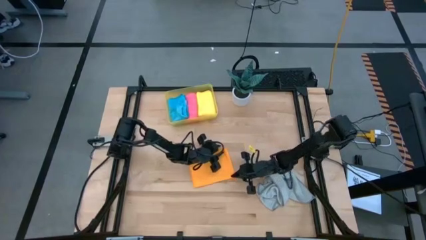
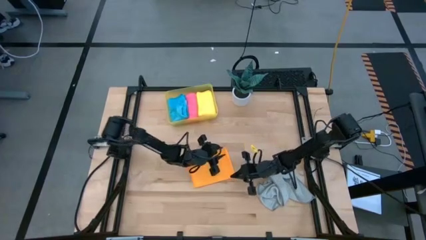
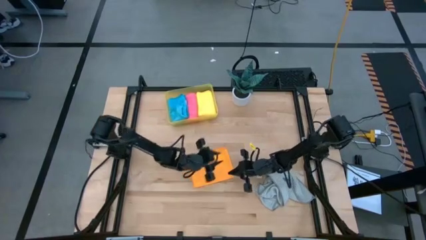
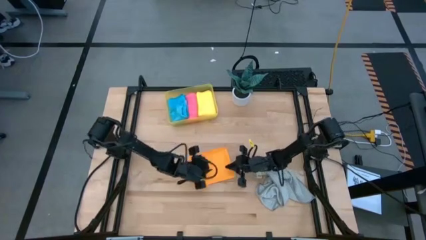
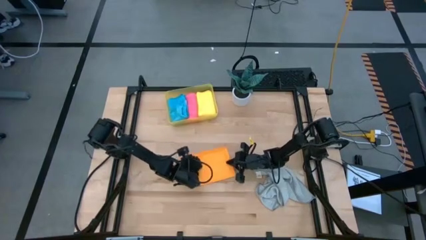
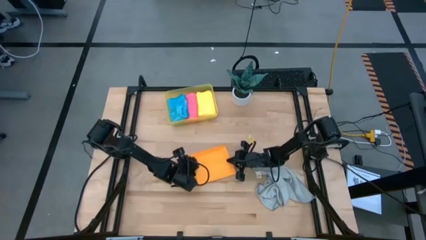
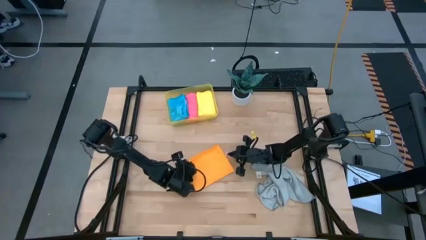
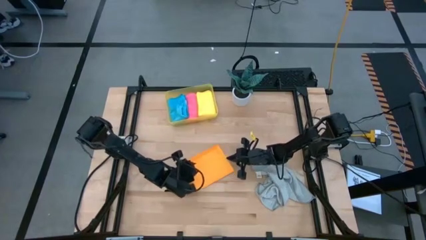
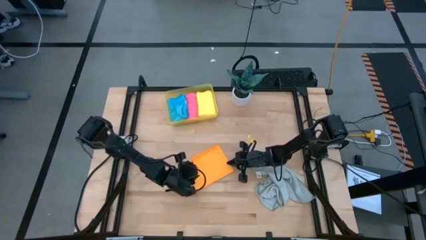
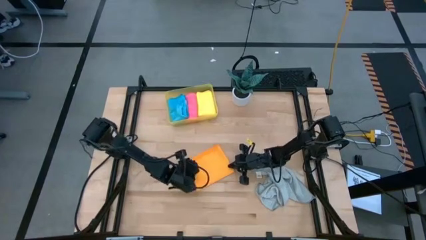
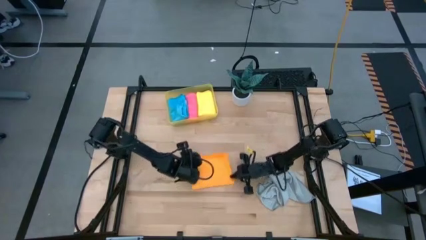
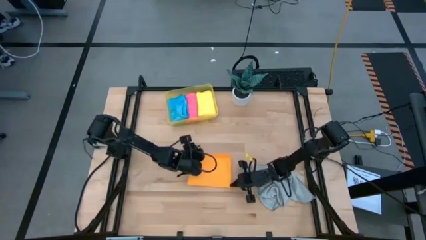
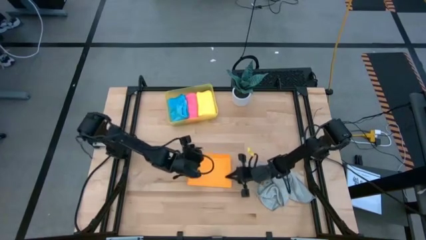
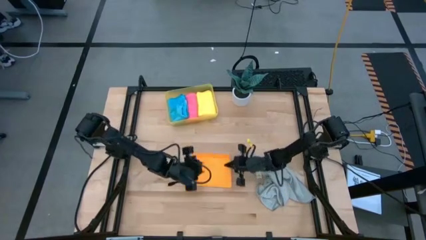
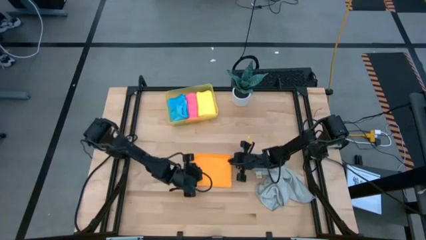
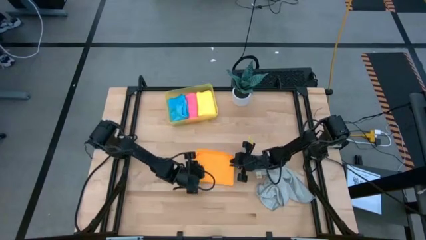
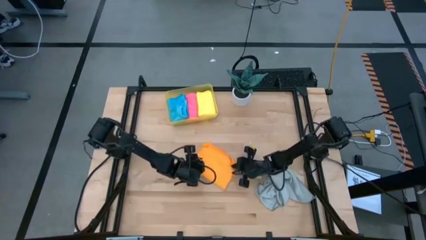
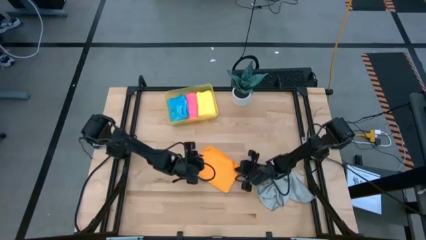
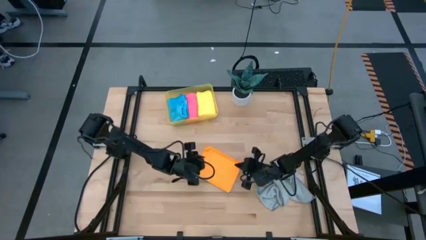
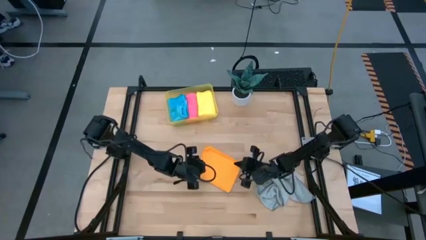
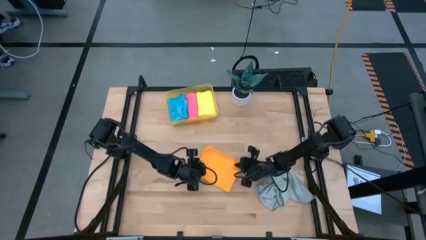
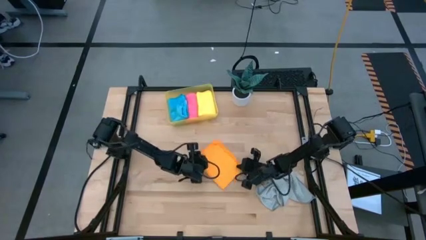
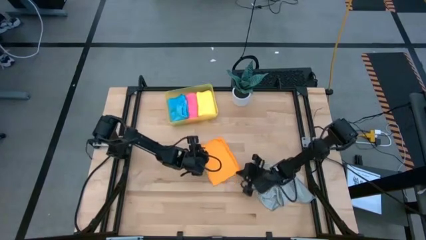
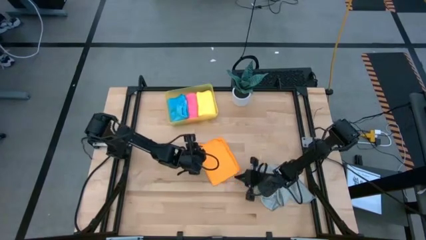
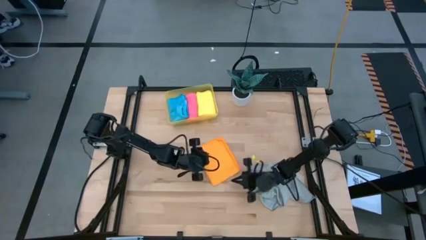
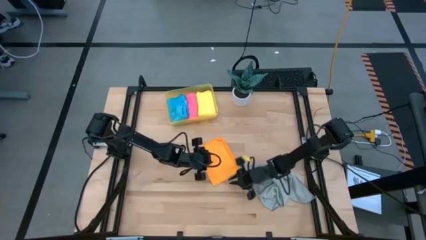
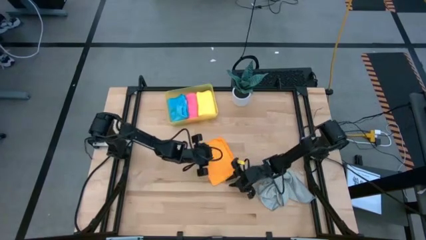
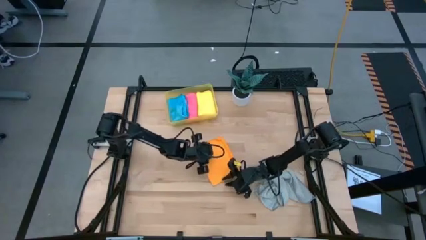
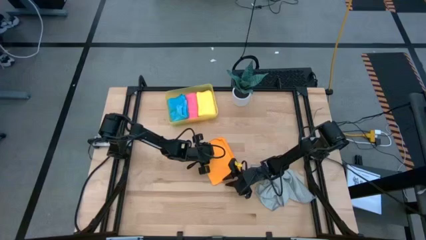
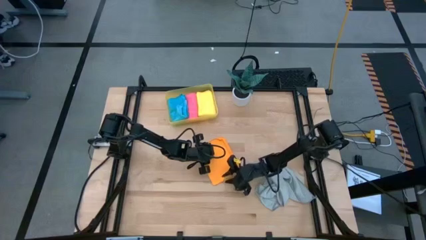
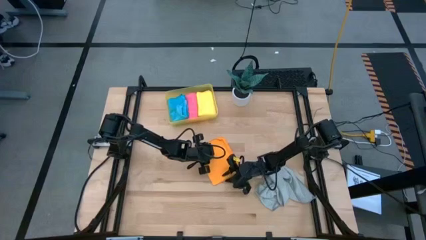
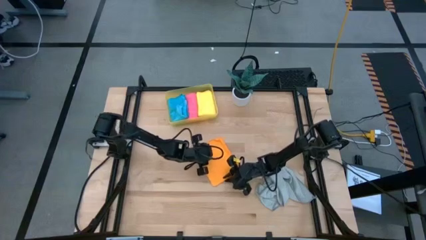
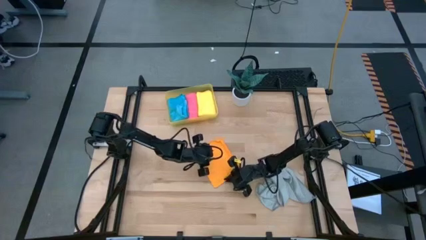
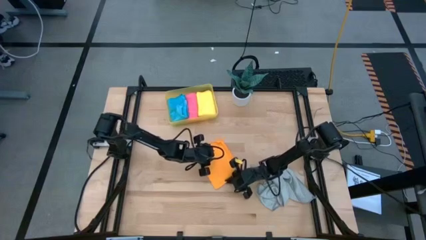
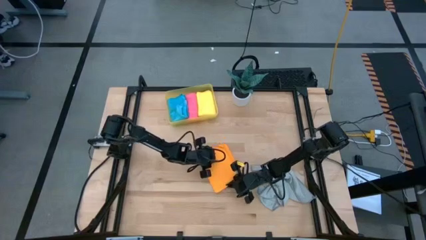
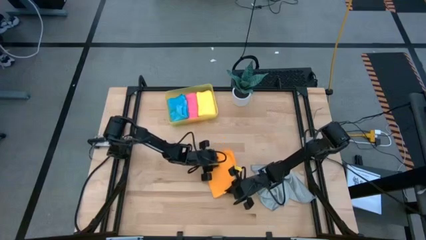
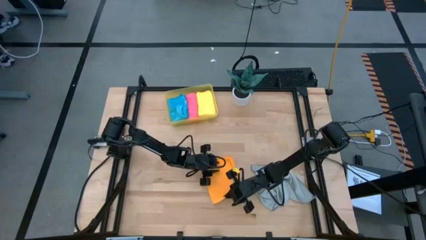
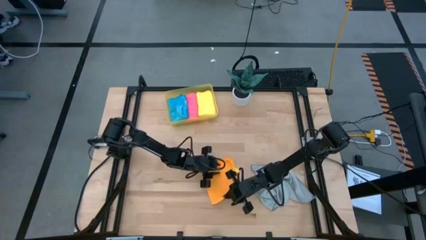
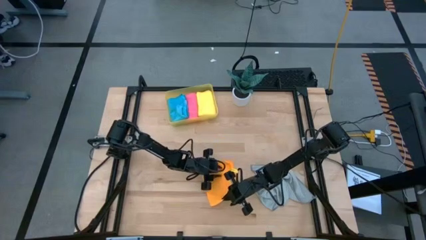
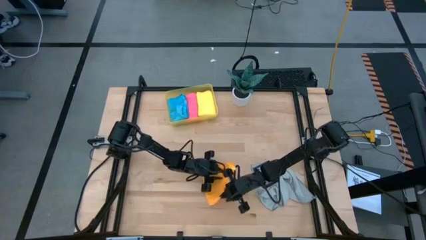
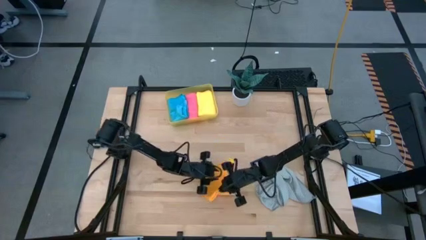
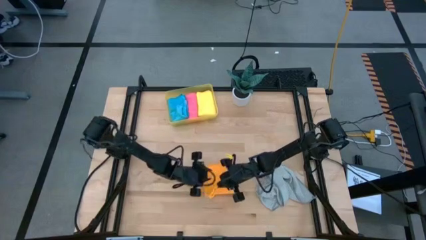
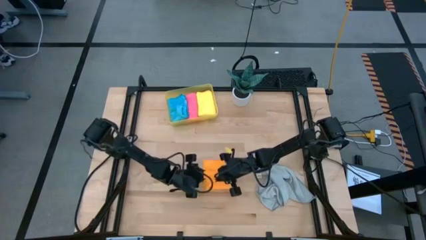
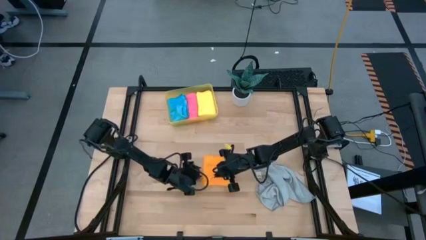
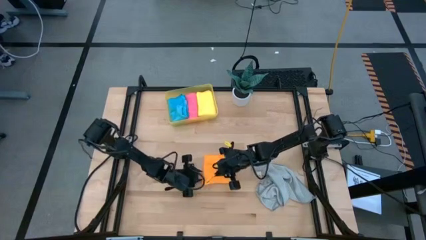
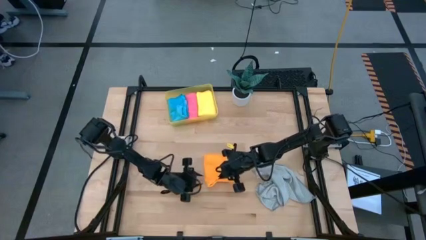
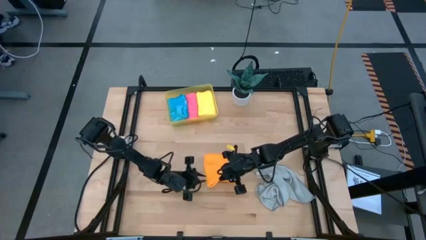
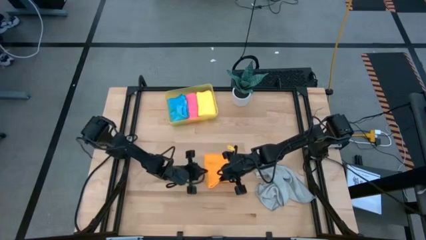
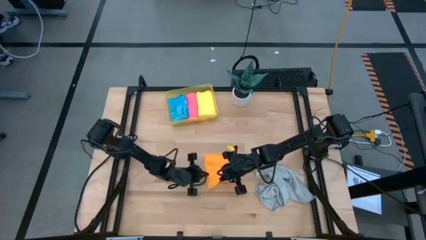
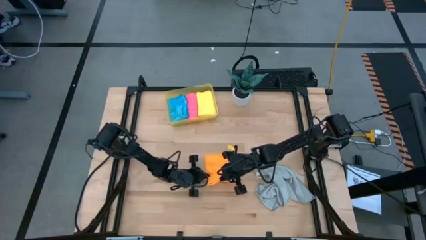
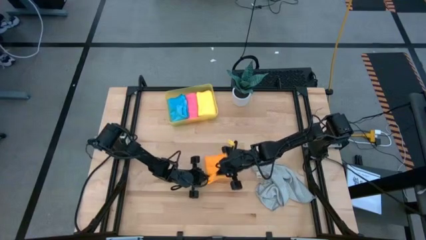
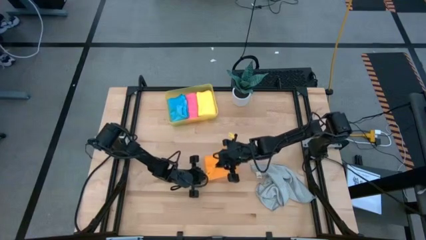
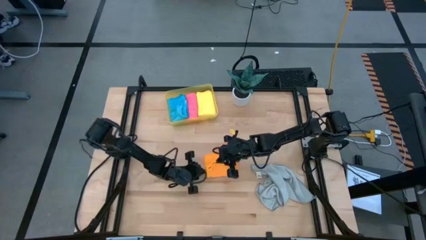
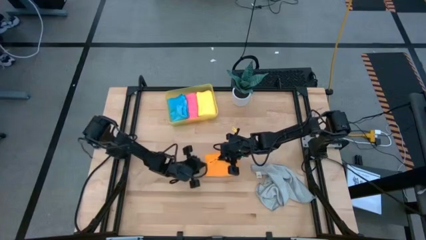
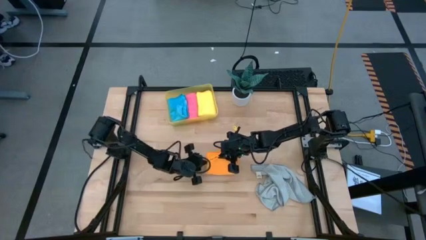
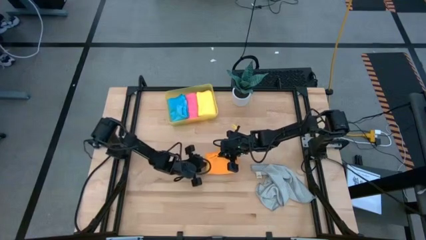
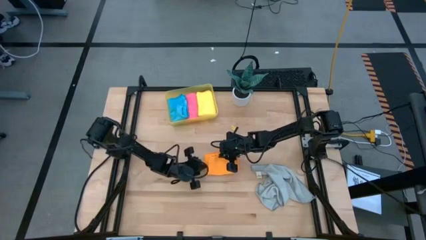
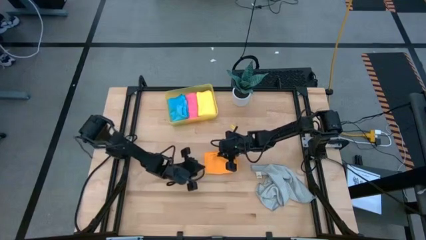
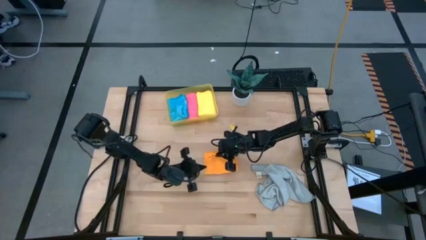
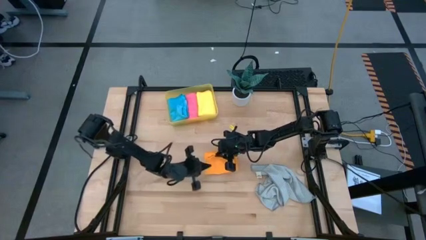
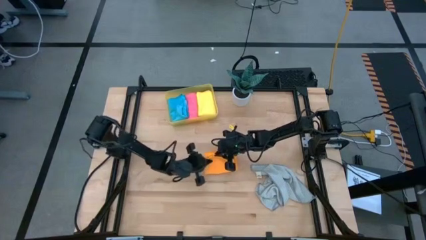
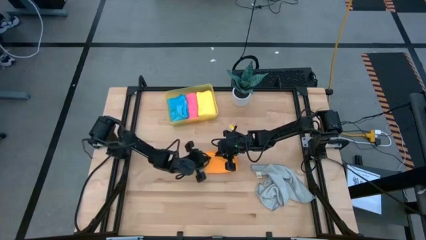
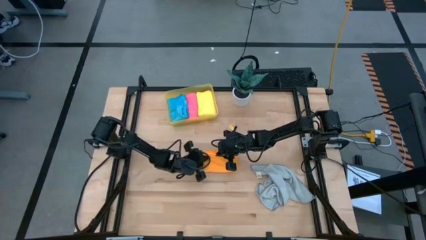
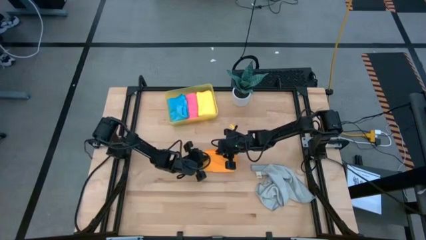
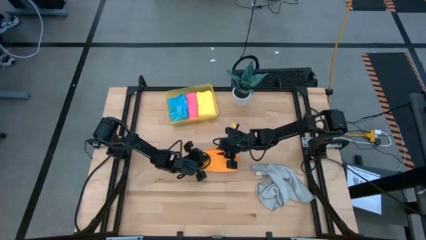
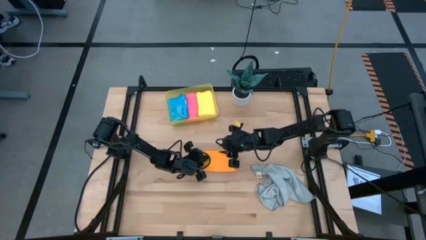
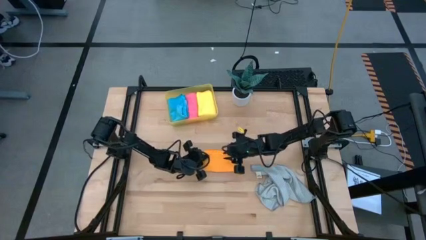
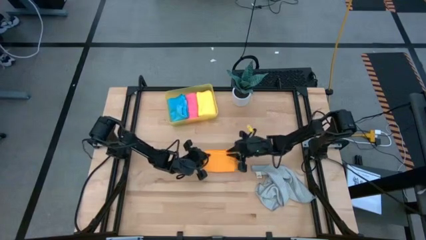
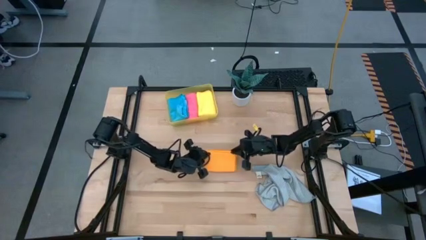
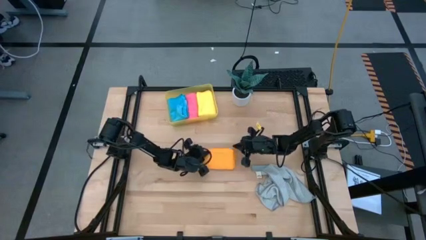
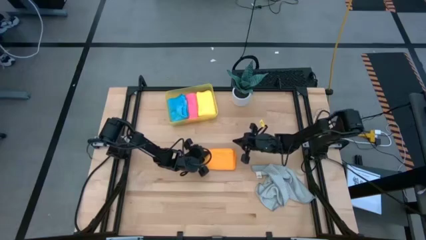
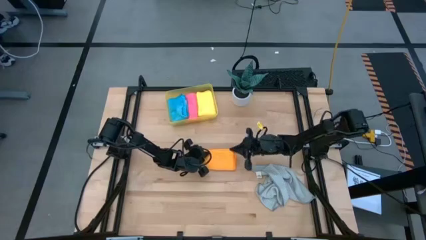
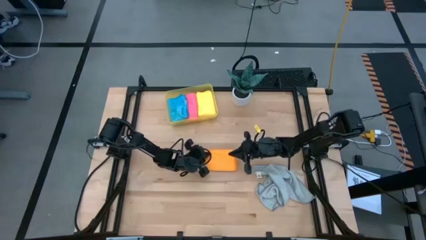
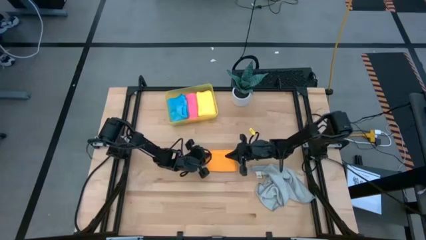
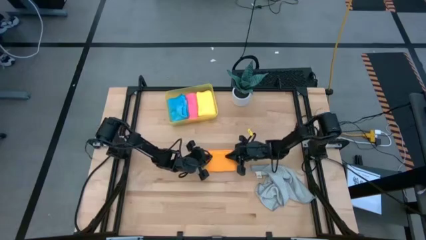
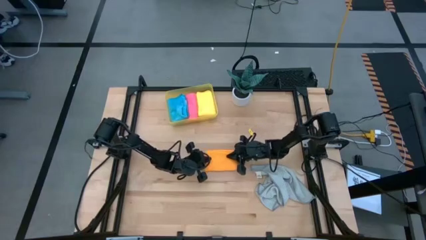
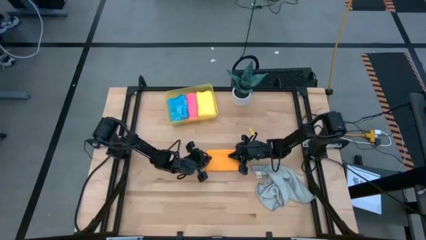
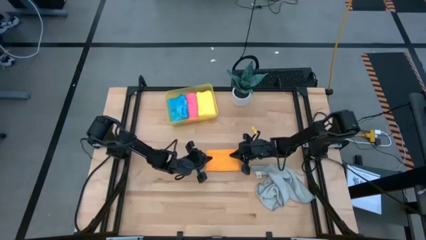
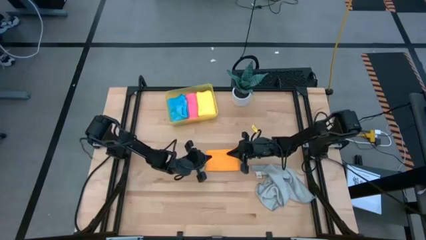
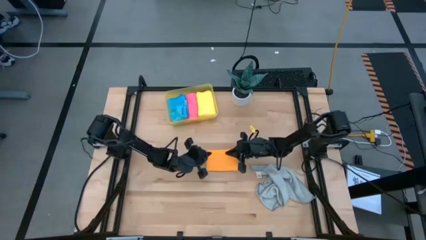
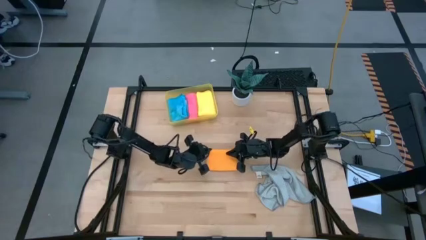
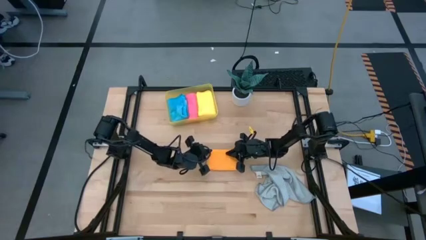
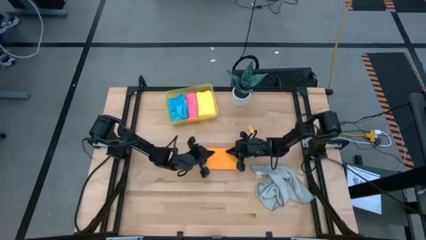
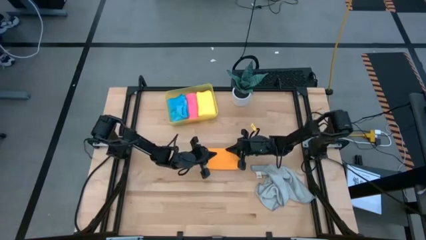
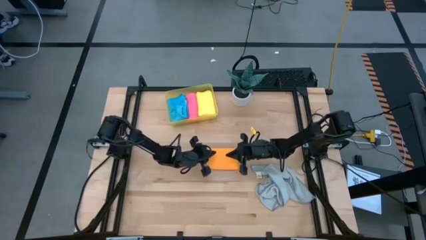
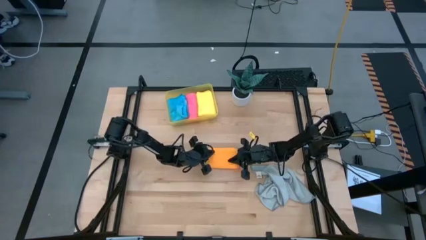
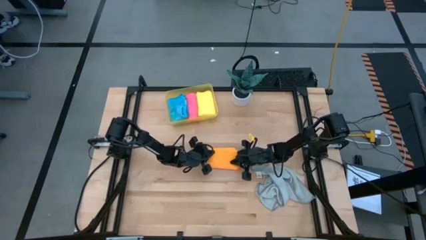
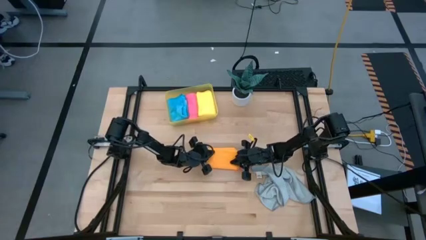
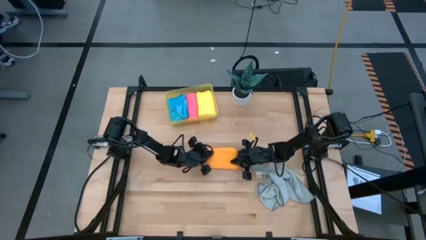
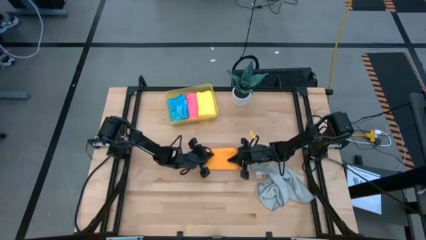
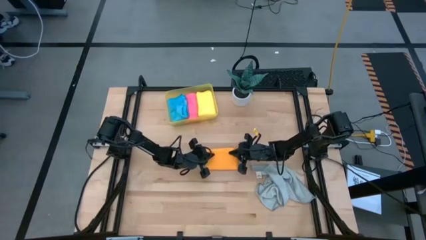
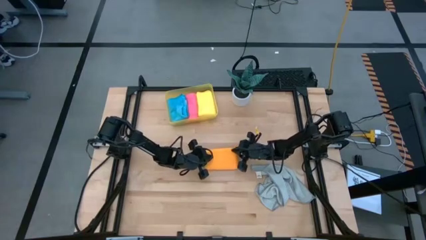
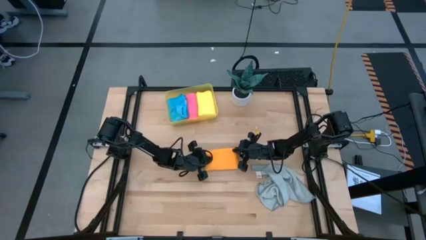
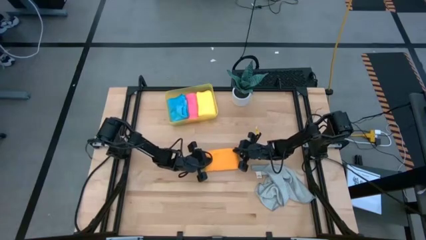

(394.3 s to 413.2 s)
Task: Fold microfiber towels
Fold the orange microfiber cloth
